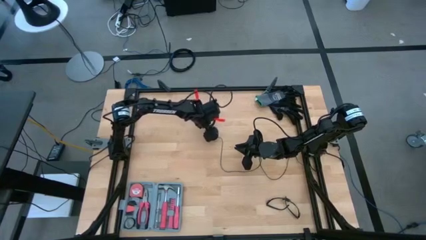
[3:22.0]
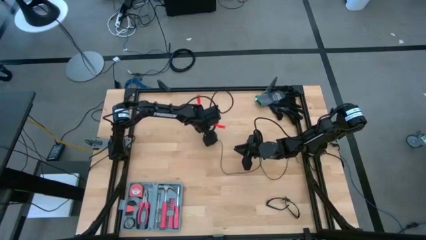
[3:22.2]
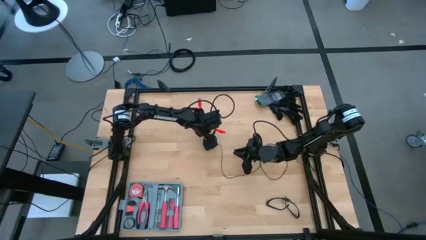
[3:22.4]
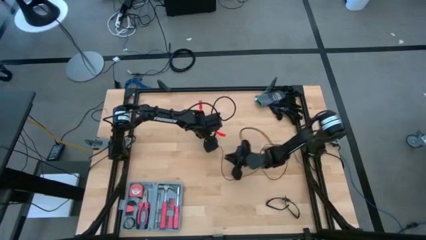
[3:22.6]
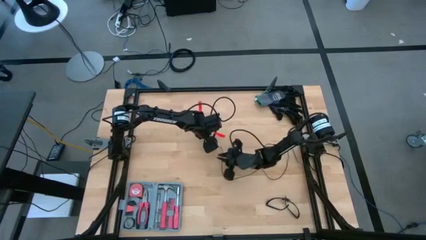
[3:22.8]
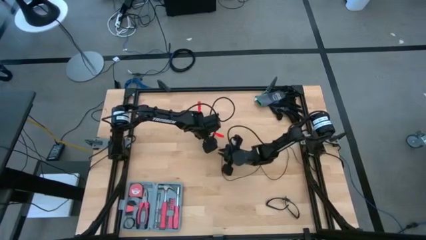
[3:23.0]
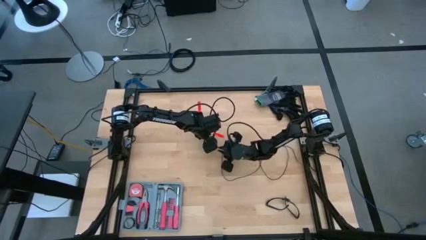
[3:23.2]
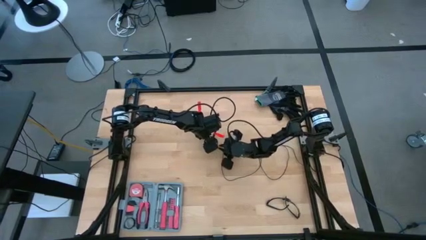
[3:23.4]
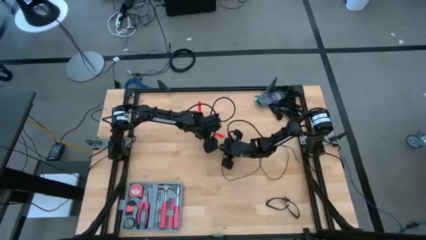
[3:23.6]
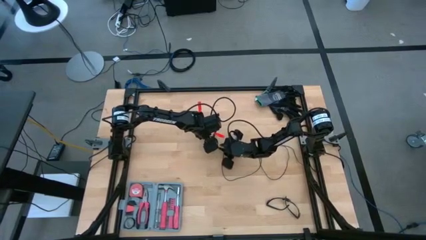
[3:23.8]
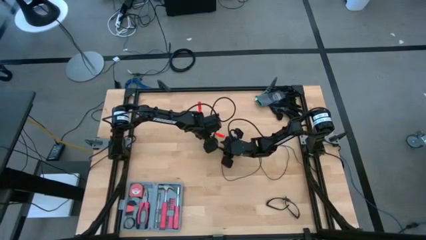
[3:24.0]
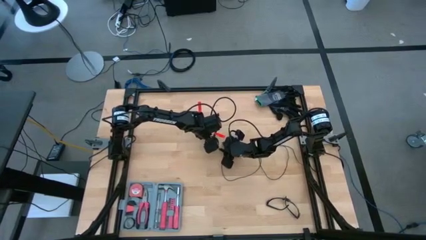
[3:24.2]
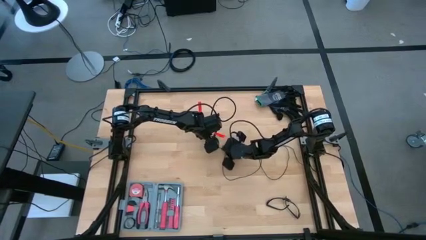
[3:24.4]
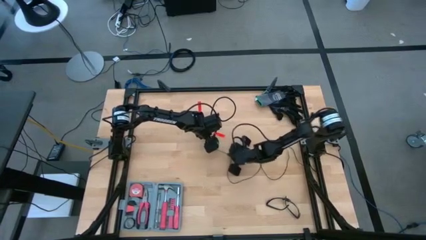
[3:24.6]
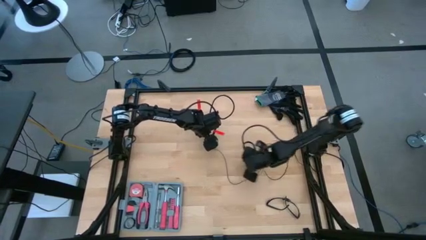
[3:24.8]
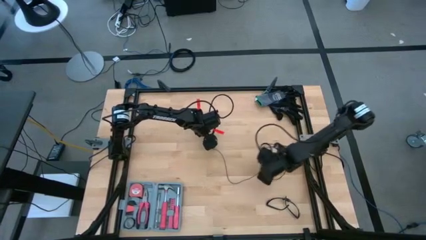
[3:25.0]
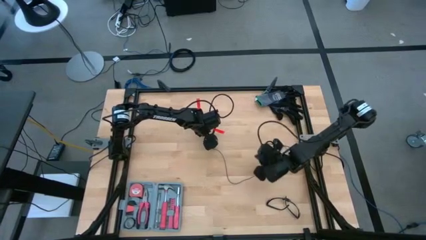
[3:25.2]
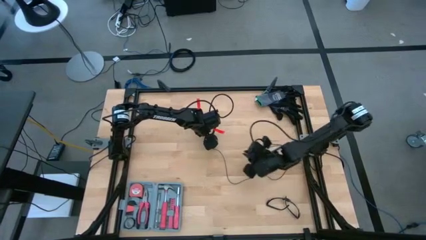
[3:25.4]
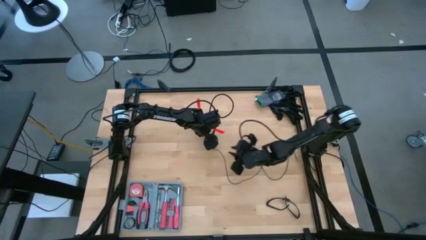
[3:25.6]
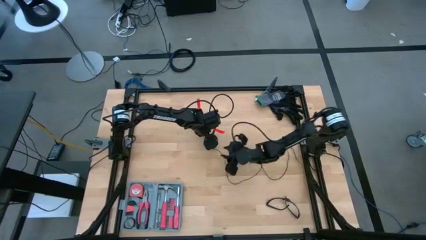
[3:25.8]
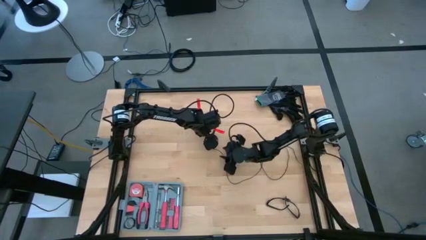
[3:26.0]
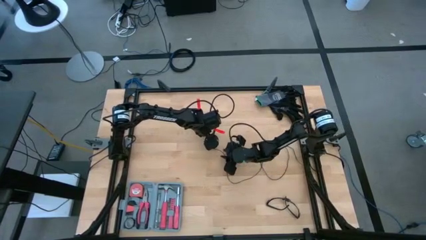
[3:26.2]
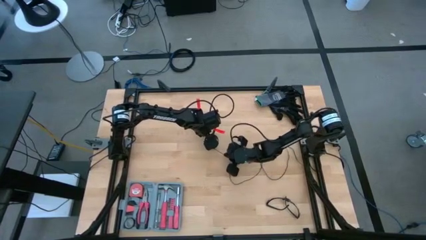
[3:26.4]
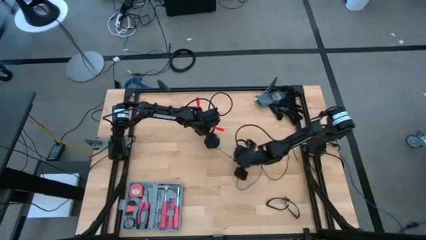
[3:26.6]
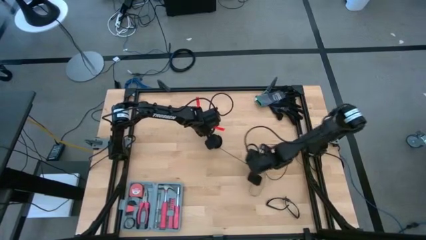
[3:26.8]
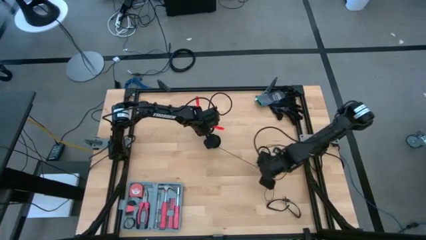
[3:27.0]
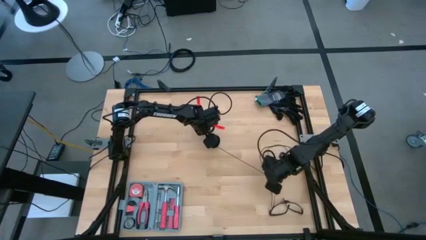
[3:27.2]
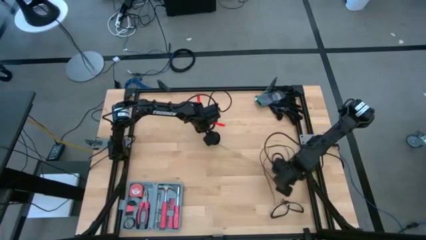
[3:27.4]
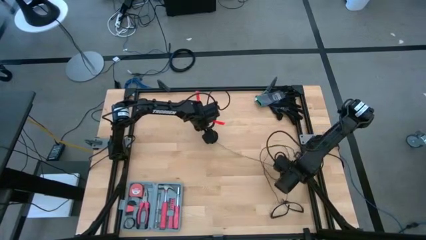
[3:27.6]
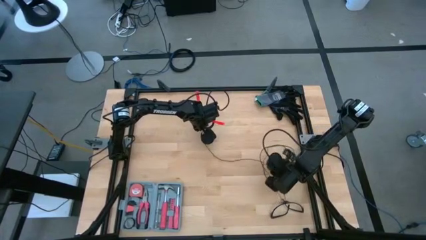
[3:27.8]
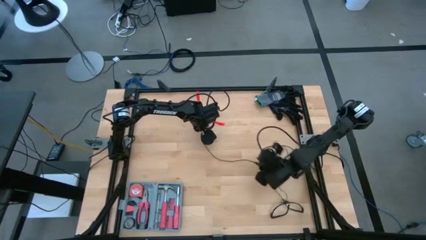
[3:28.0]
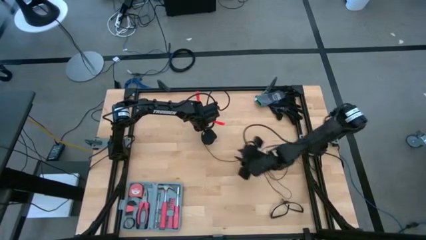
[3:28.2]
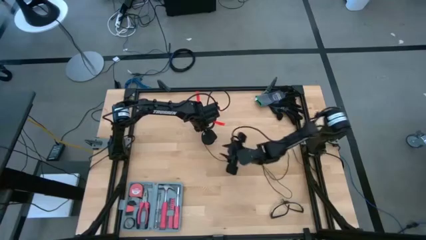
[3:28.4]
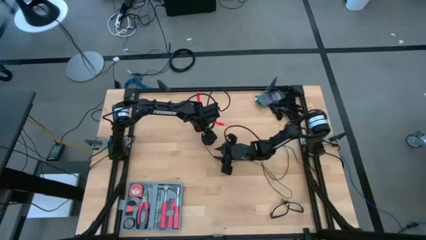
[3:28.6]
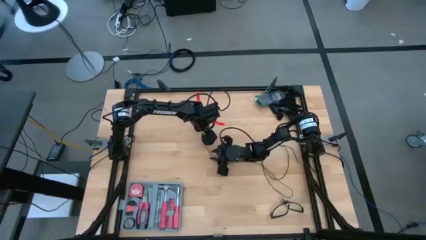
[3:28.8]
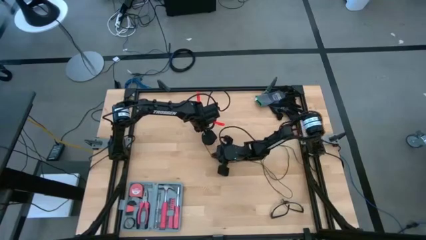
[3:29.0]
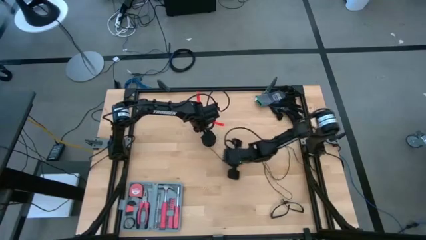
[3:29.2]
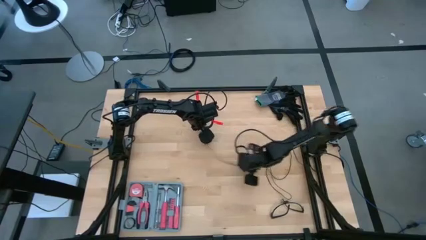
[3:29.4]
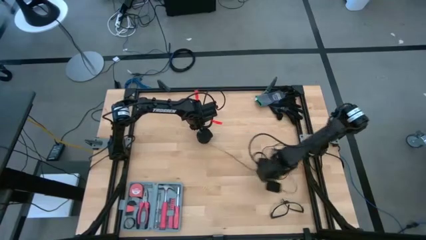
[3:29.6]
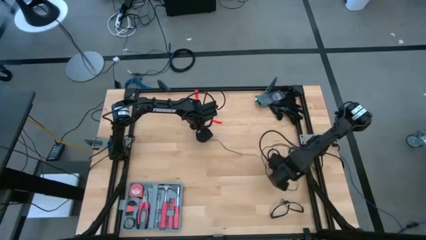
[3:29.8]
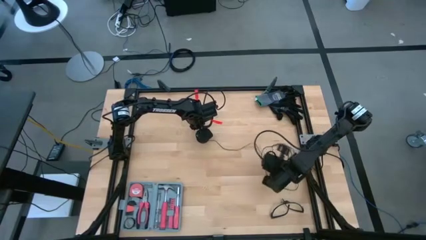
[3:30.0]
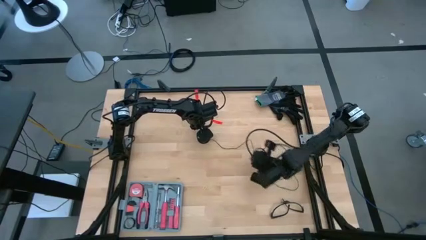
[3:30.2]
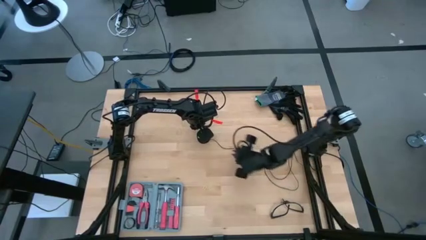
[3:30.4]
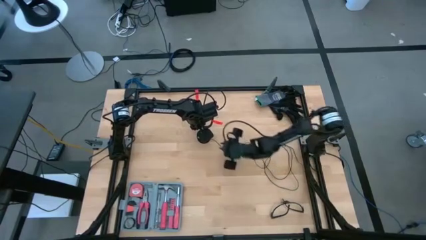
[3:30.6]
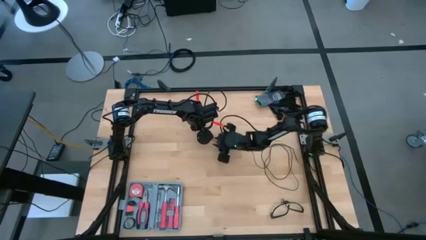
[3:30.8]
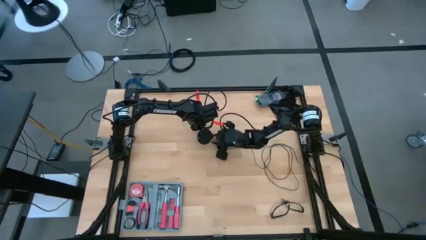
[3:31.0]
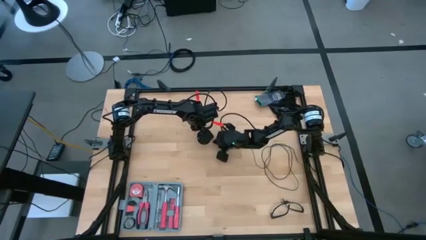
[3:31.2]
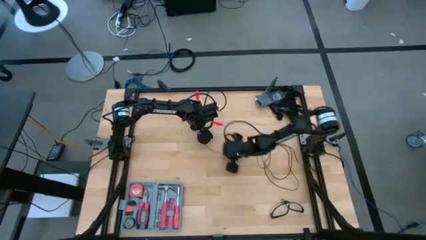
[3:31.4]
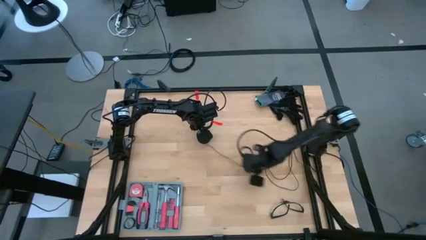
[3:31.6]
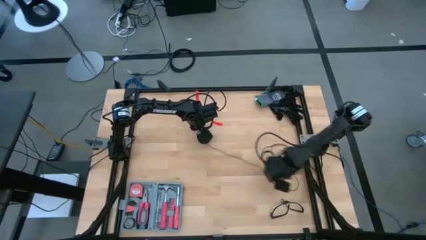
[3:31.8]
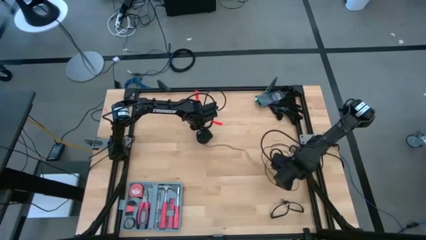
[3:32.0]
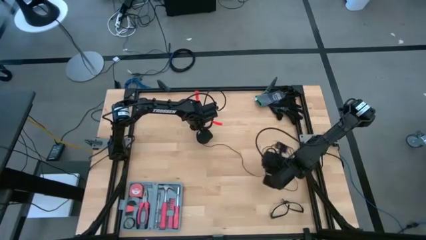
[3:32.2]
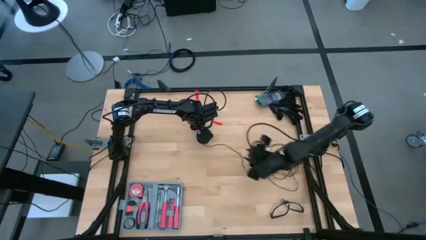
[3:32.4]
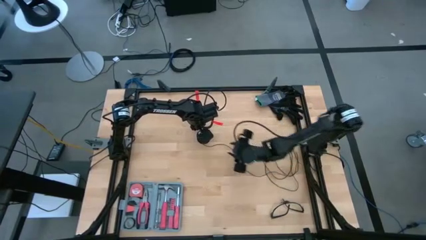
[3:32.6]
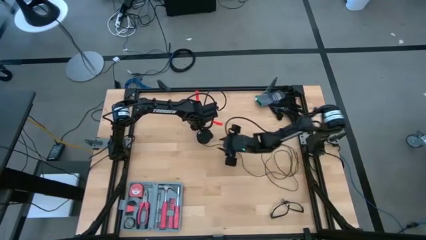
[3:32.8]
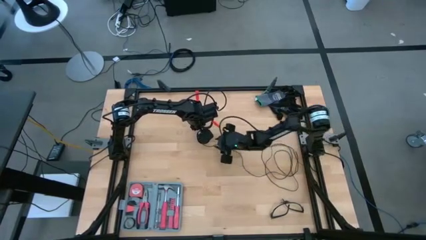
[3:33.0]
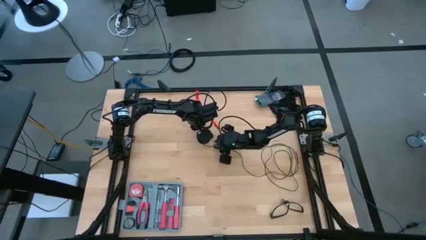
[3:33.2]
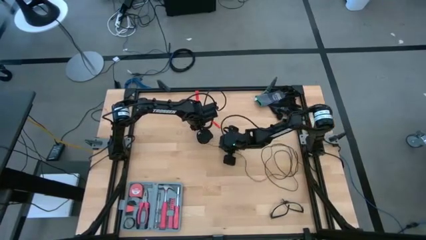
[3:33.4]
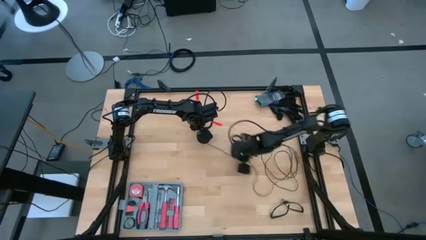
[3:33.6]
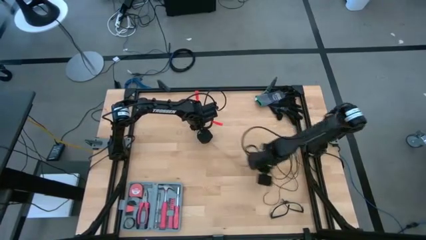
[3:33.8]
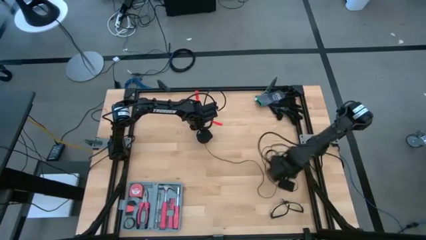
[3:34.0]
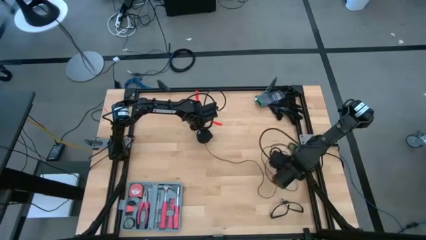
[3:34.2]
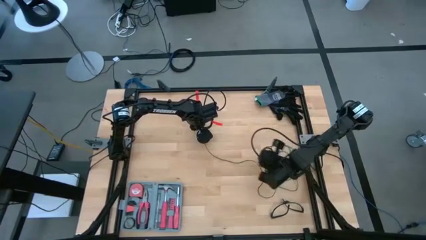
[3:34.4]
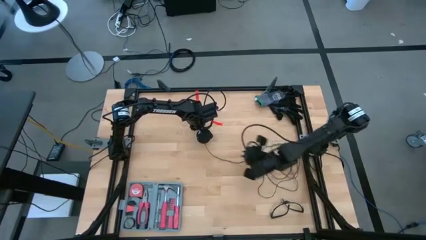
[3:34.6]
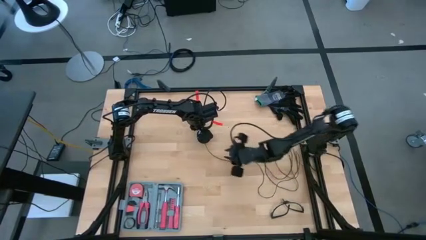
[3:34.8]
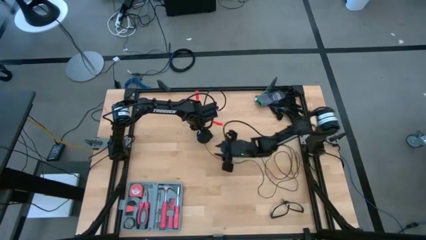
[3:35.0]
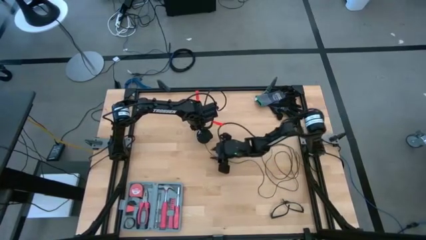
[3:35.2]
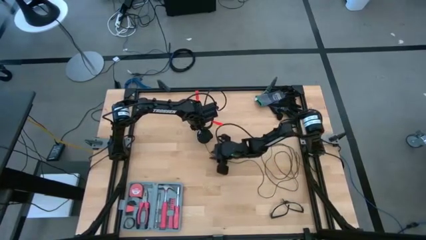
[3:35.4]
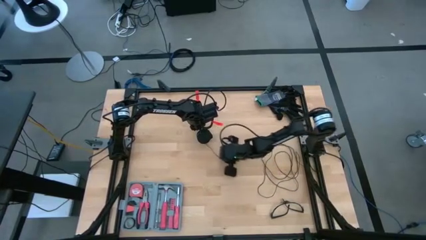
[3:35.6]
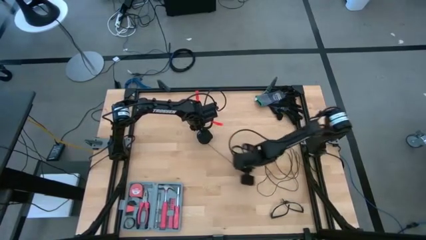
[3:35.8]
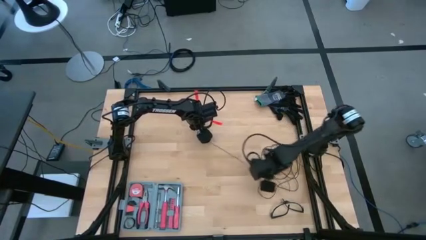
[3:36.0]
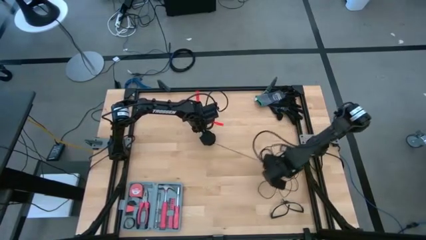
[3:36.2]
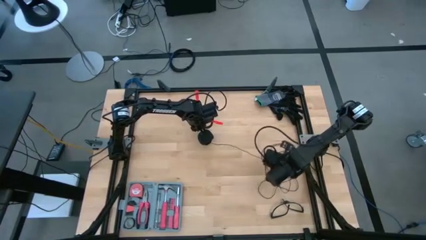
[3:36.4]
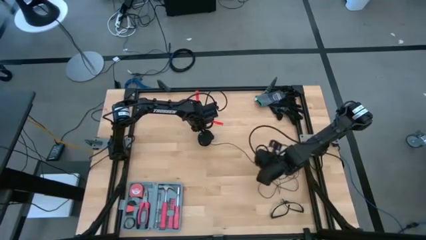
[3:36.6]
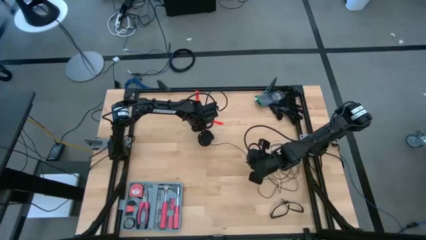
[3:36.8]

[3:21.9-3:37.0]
Task: Coil cords
Uncoil the black wire from the spool
